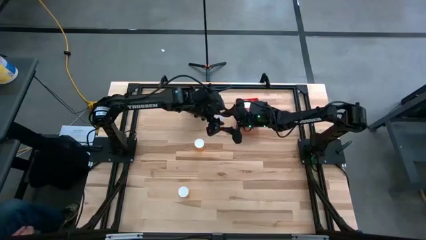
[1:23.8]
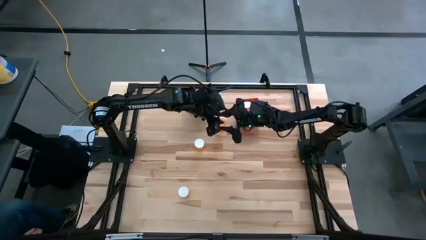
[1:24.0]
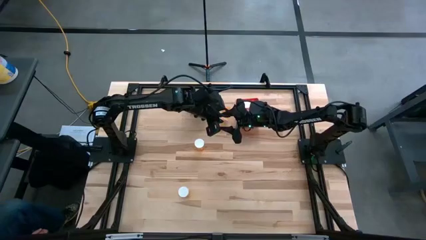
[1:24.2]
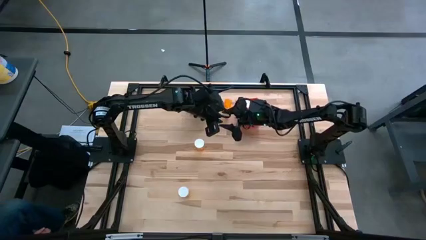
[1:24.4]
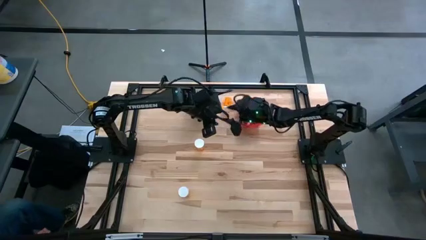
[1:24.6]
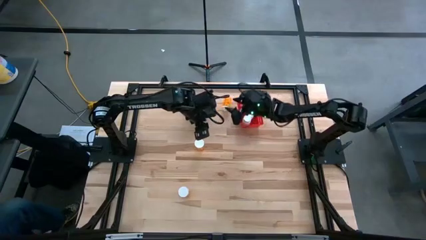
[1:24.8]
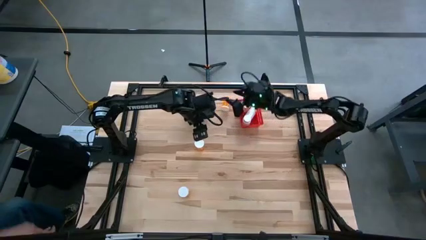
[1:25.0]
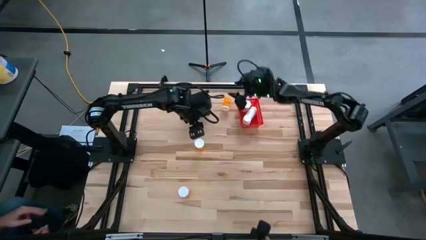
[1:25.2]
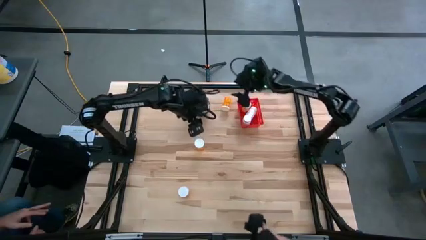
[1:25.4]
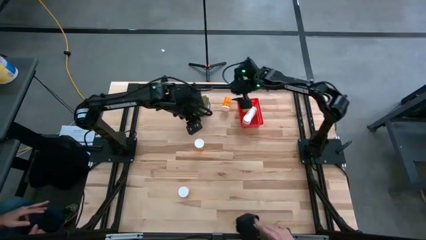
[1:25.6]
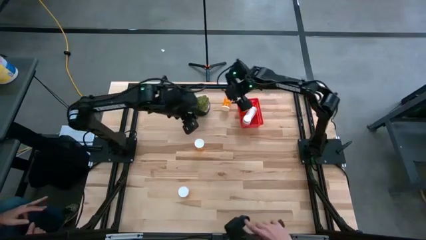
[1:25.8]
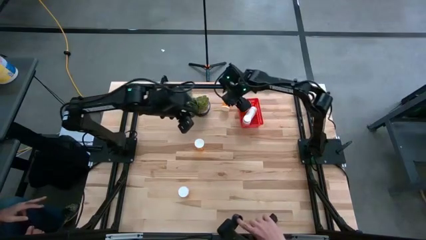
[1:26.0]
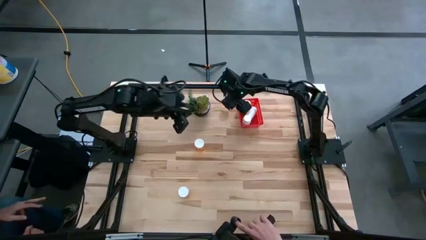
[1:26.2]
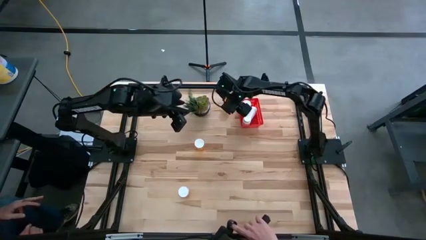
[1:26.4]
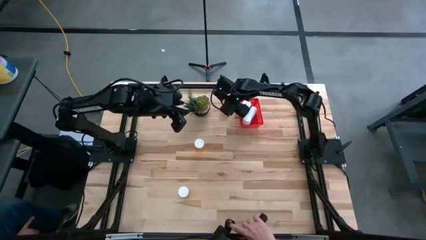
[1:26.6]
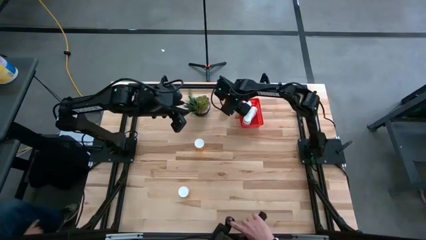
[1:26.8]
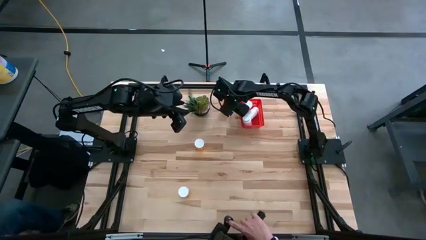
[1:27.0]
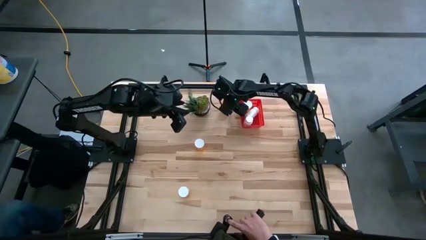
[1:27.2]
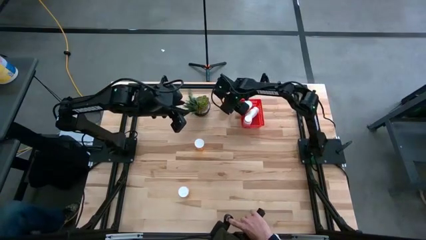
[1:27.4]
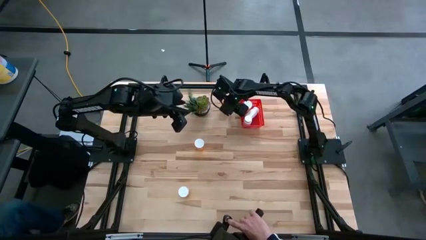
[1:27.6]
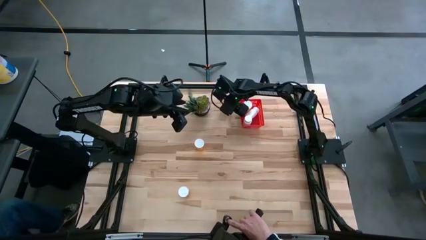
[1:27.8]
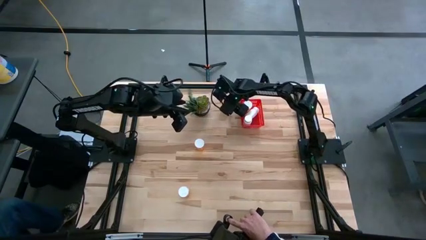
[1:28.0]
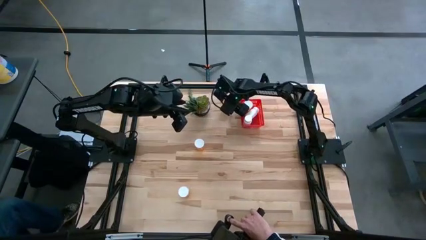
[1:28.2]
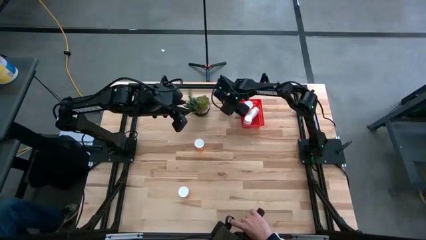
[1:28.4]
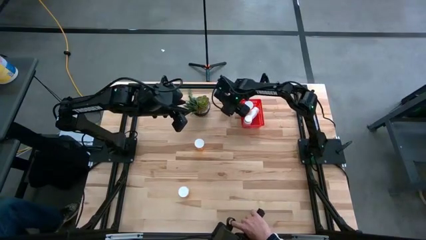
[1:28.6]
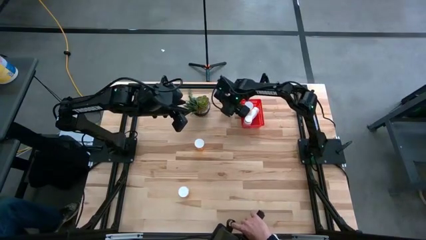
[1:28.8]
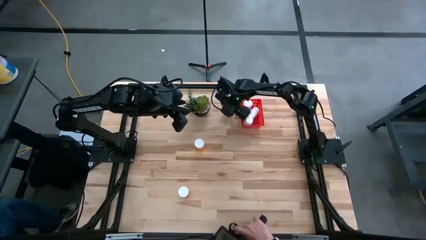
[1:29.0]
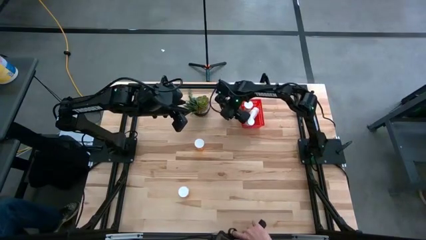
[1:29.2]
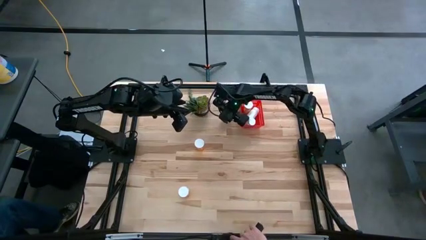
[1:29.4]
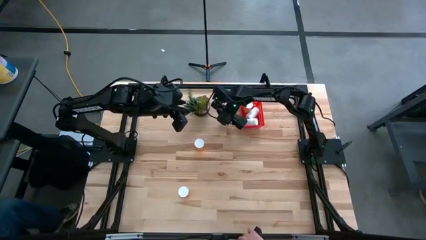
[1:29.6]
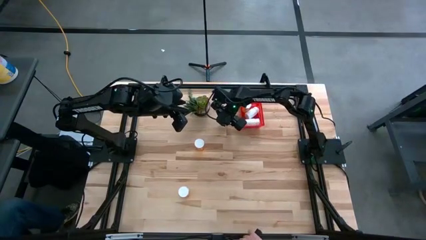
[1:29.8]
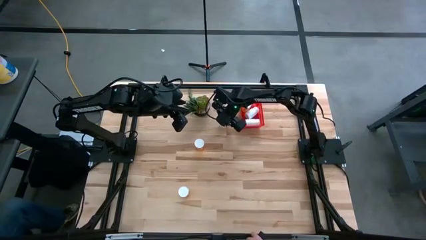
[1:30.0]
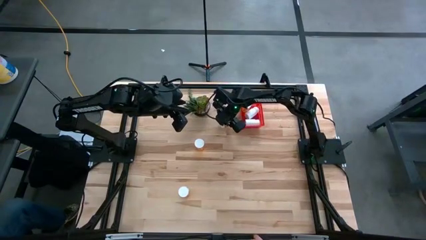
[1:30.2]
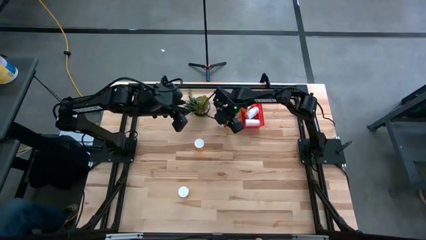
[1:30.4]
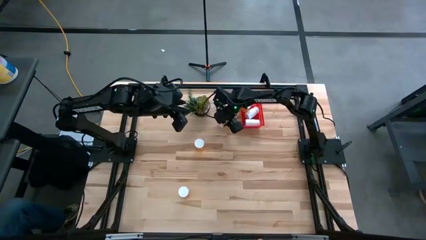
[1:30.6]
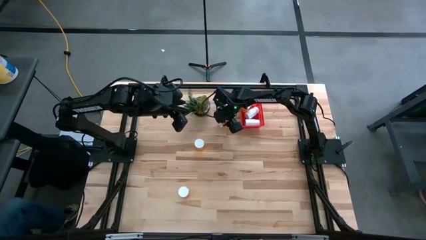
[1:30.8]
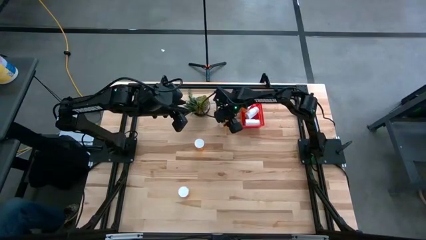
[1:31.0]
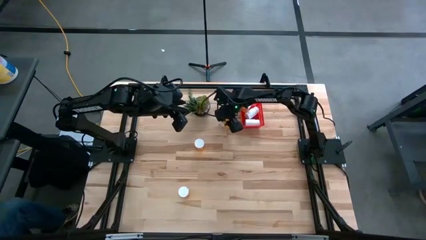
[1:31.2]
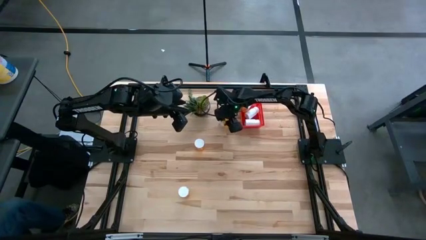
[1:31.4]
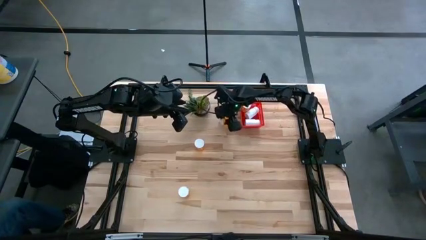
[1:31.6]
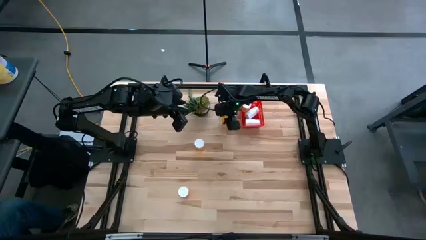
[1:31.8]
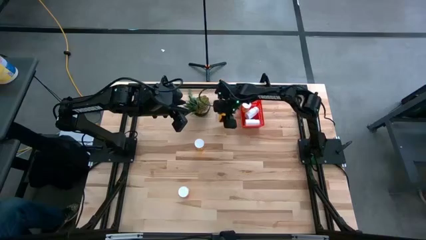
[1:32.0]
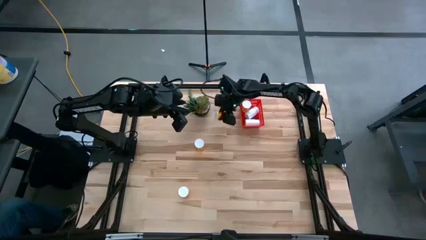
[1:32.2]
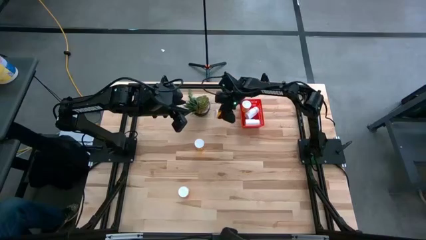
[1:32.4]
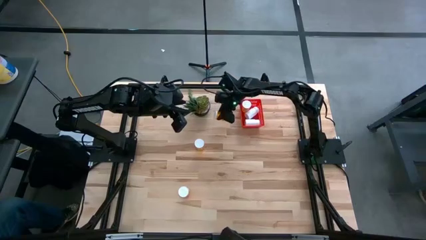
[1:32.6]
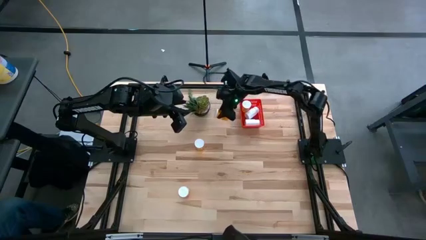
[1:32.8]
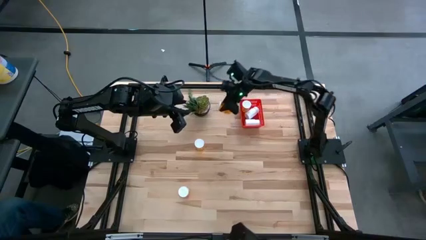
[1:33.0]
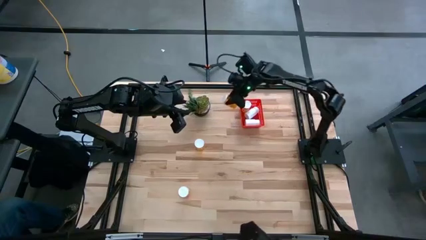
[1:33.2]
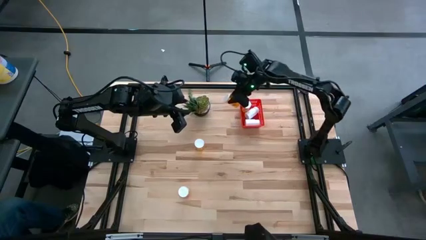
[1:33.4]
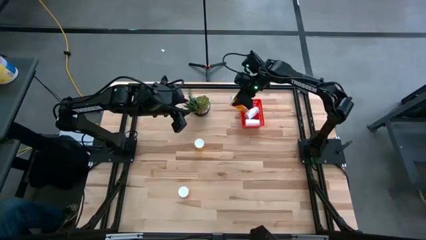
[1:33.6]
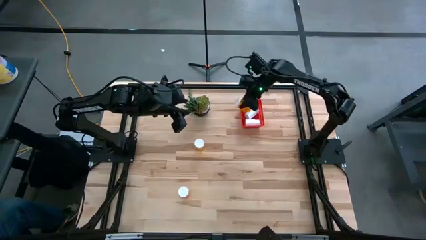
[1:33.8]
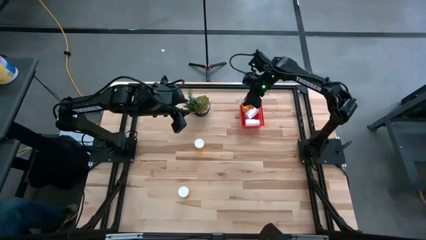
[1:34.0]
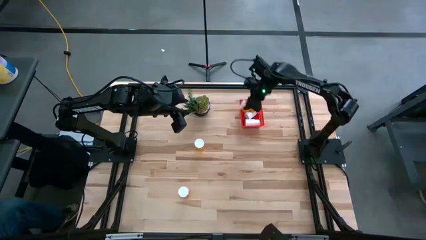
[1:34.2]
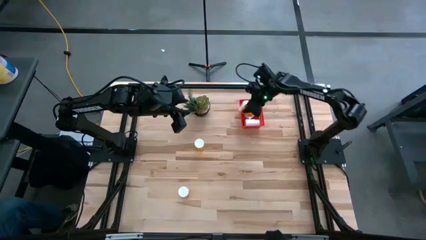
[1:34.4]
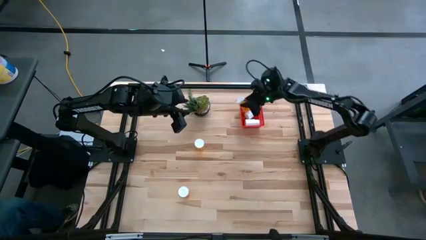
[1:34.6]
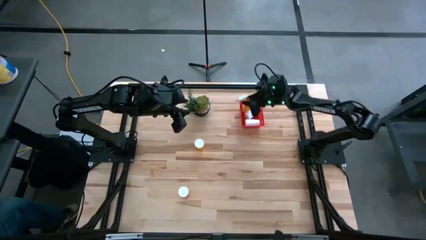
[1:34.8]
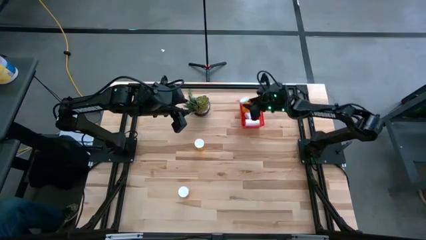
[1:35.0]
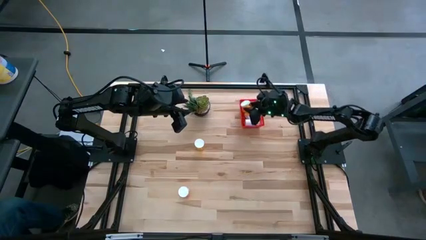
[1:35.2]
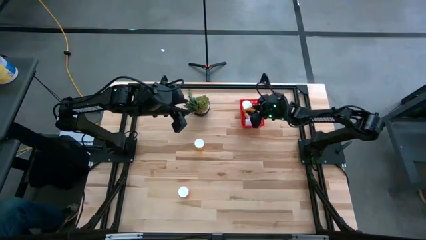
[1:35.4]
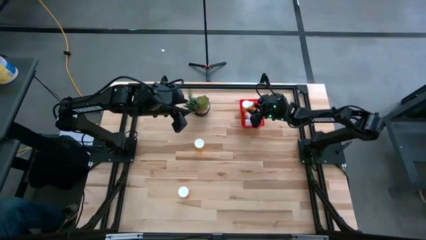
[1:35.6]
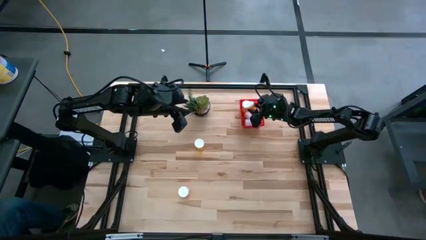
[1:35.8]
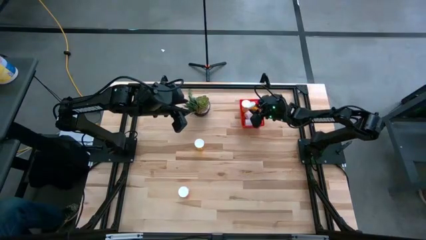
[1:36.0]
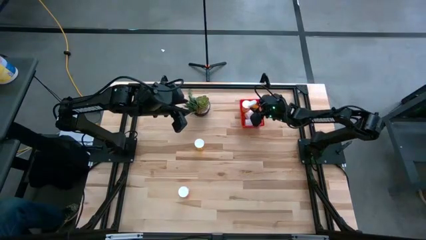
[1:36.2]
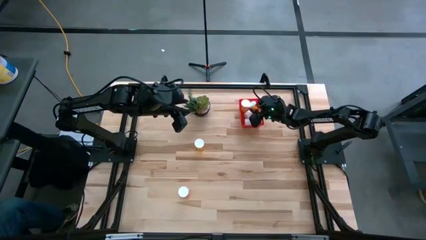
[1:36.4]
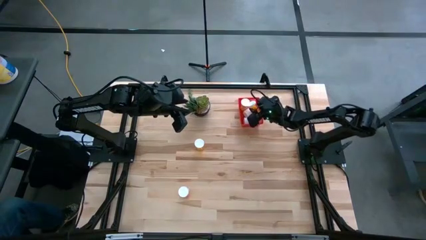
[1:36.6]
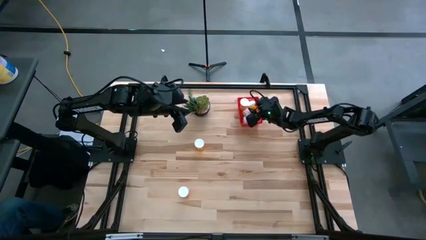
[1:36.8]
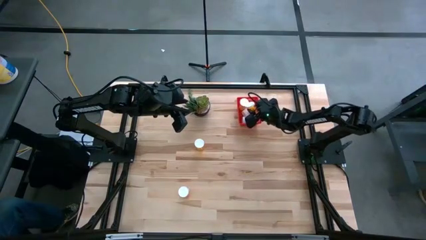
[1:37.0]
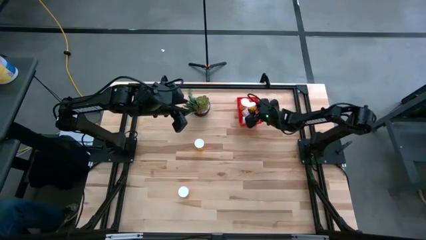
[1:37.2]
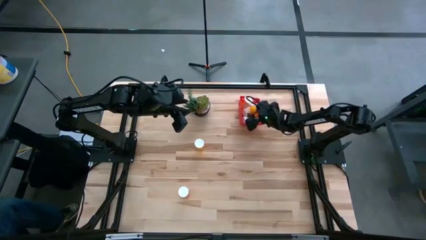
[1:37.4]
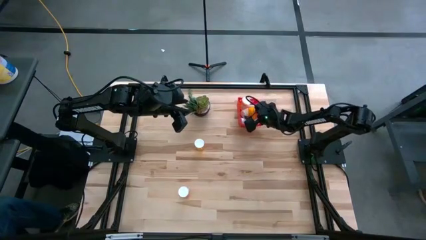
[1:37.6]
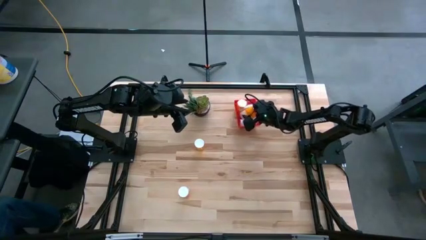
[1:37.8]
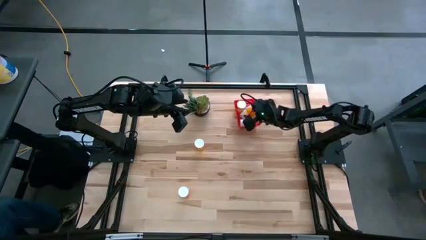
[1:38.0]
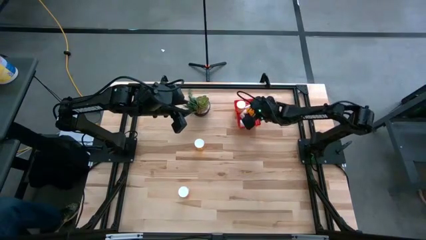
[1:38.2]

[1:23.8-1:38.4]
Task: Pick and place pill bottles into a basket
Put the middle left orange pill bottle into the bin

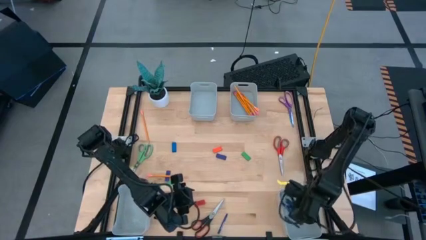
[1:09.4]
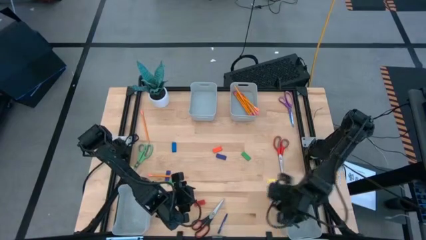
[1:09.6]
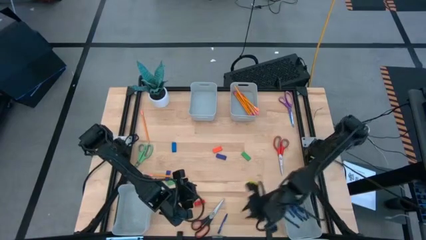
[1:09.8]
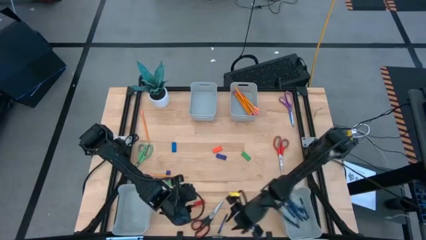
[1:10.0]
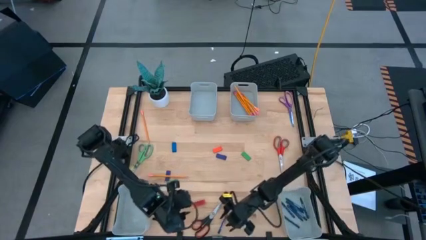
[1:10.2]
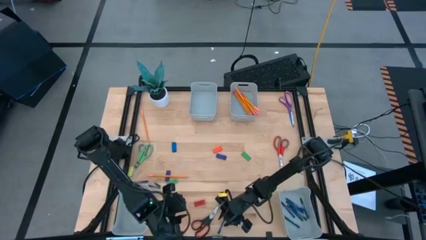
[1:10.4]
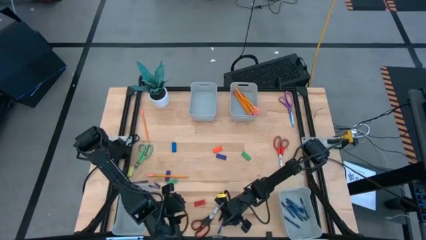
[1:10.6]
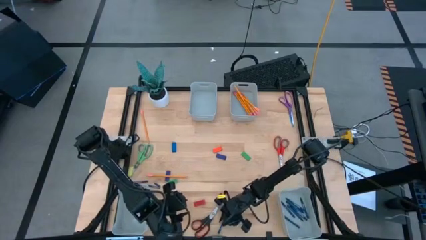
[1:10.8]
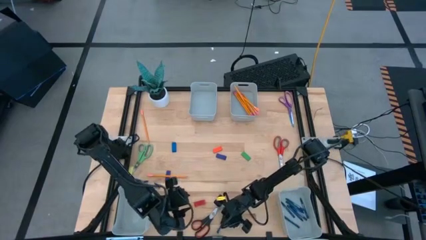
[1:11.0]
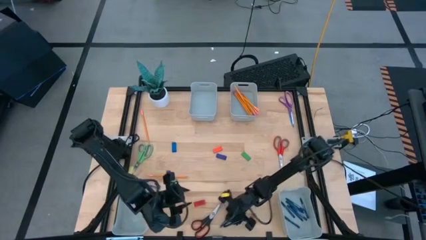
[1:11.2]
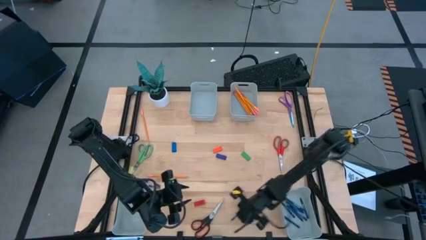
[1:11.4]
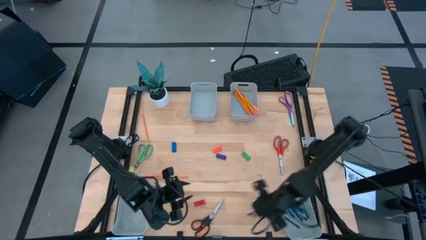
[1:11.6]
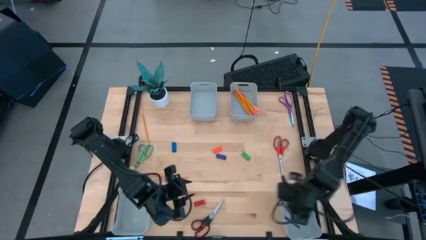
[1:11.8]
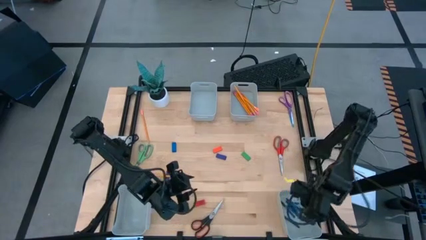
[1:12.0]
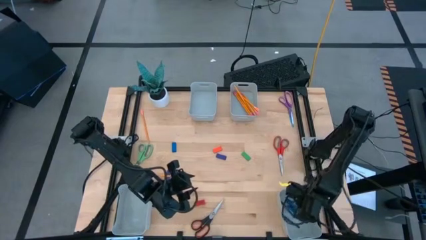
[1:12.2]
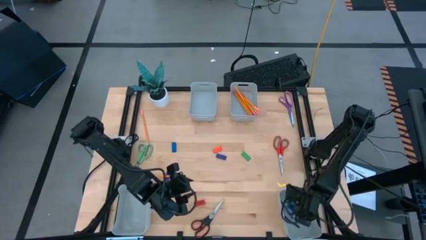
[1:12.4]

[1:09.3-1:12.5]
Task: Sort crayons/erasers/pens/pencils in bins
Put the blue crayon into the bottom right bin
